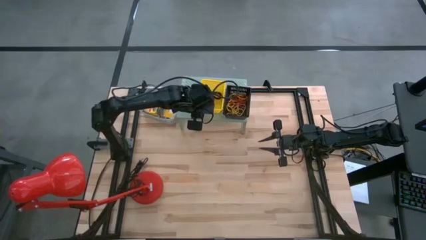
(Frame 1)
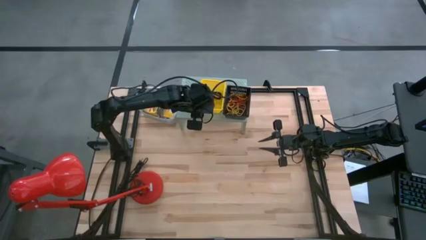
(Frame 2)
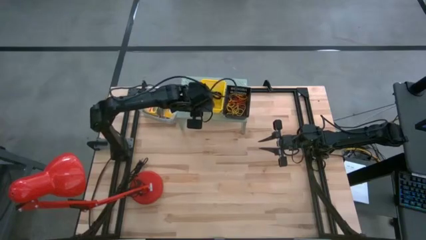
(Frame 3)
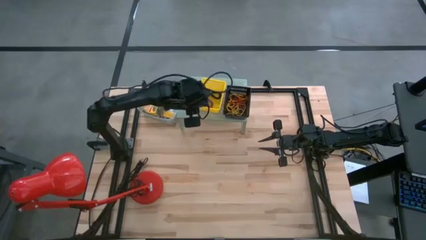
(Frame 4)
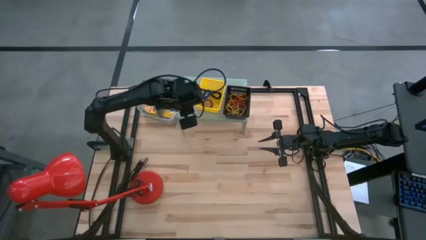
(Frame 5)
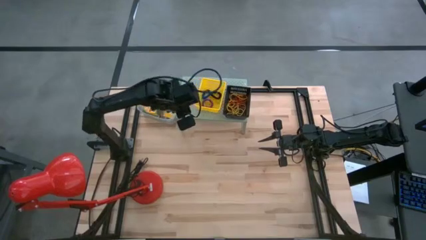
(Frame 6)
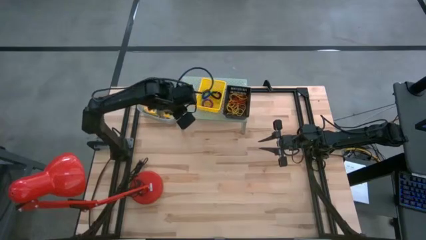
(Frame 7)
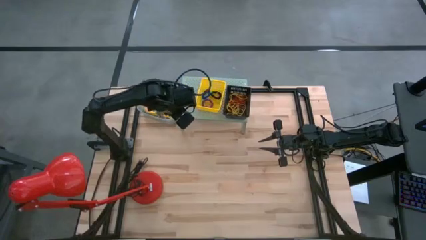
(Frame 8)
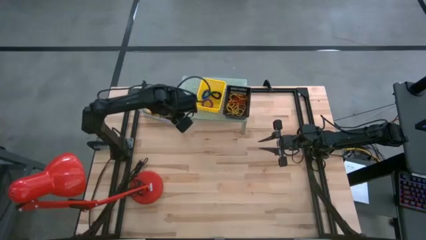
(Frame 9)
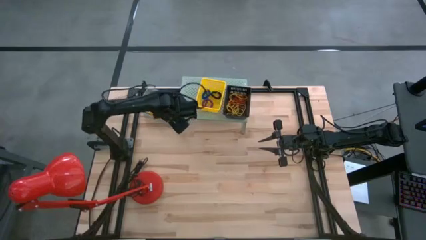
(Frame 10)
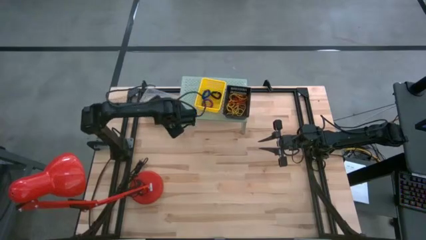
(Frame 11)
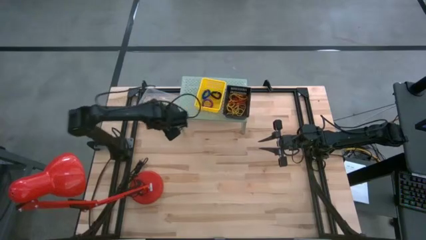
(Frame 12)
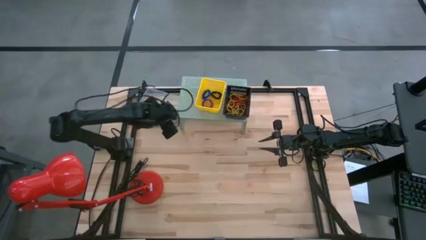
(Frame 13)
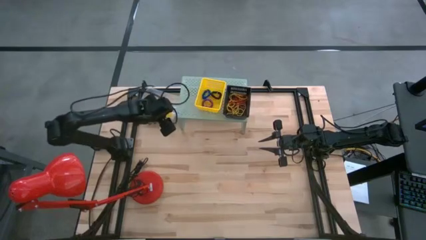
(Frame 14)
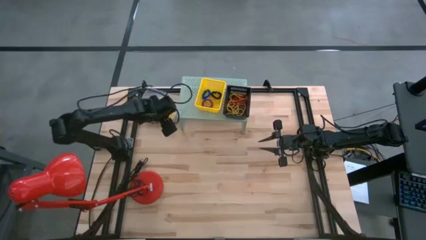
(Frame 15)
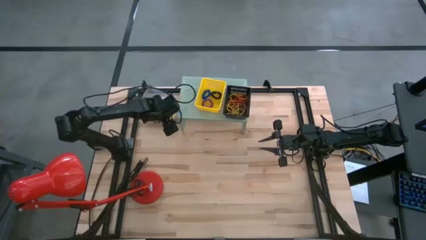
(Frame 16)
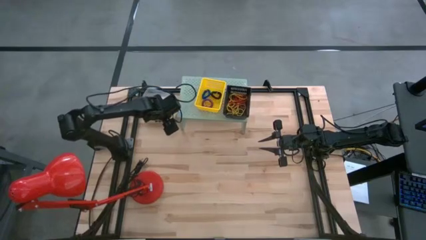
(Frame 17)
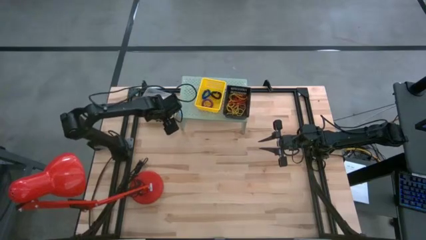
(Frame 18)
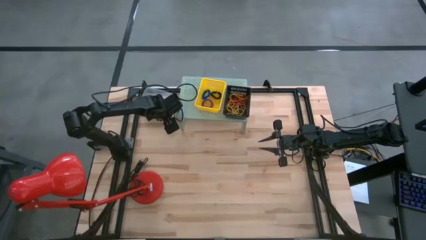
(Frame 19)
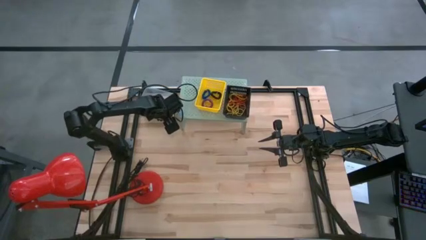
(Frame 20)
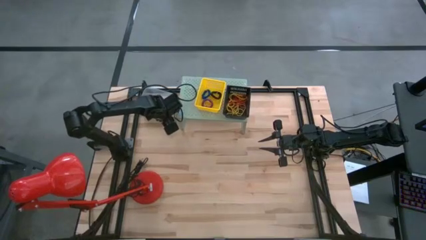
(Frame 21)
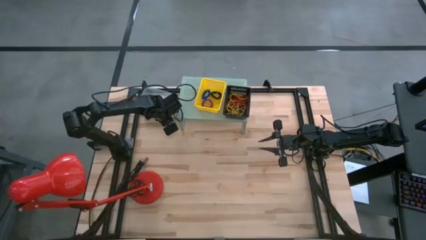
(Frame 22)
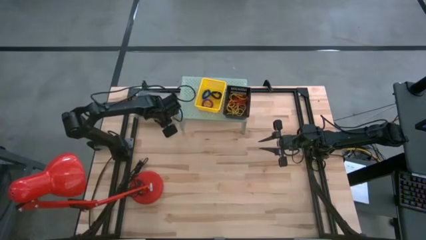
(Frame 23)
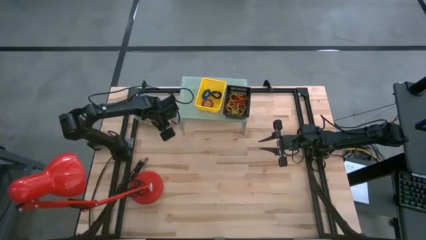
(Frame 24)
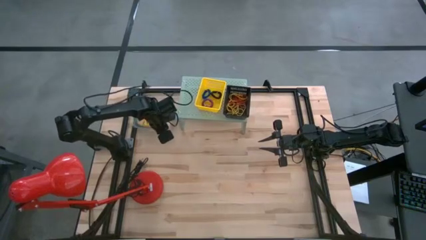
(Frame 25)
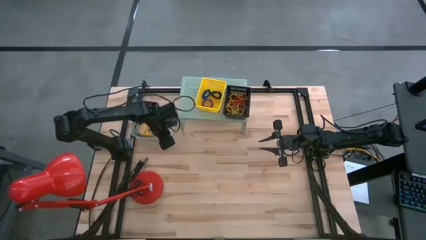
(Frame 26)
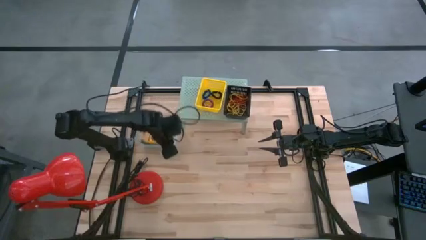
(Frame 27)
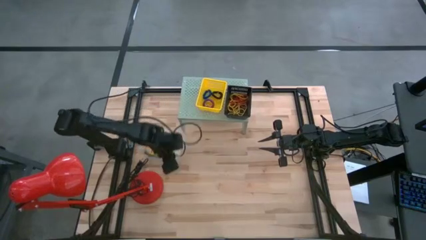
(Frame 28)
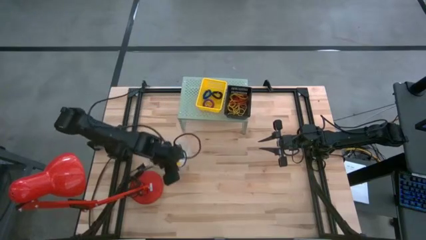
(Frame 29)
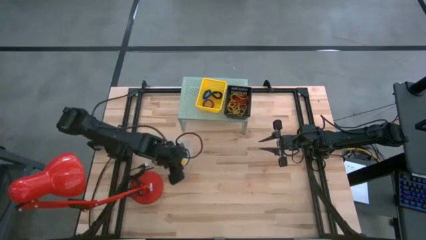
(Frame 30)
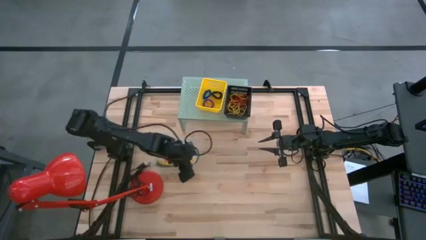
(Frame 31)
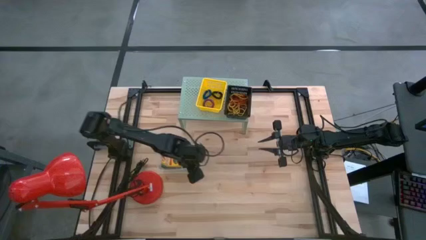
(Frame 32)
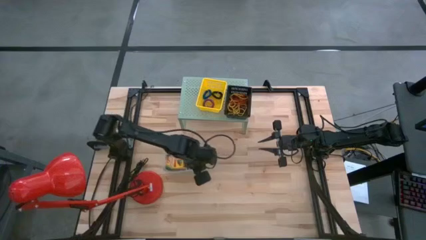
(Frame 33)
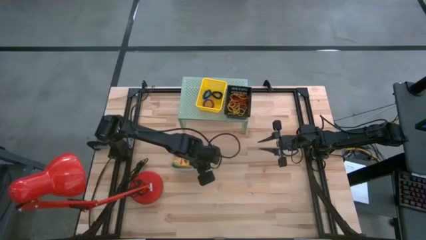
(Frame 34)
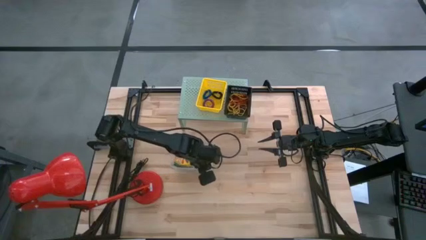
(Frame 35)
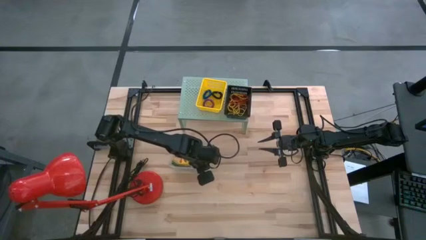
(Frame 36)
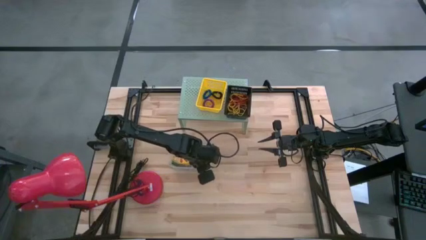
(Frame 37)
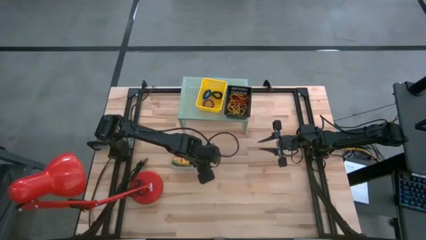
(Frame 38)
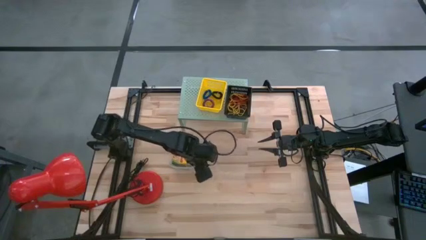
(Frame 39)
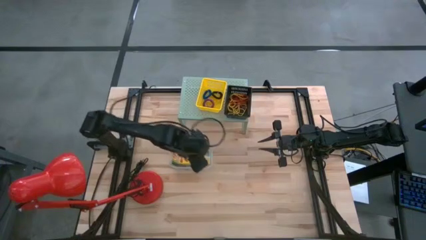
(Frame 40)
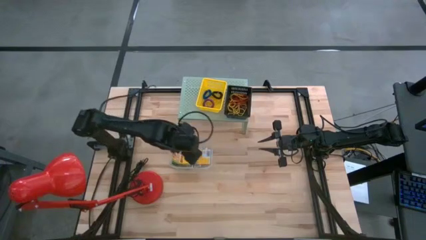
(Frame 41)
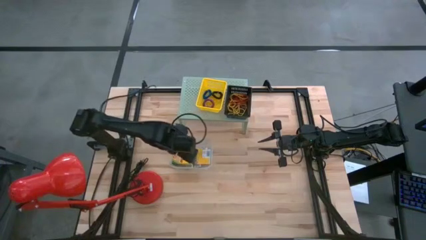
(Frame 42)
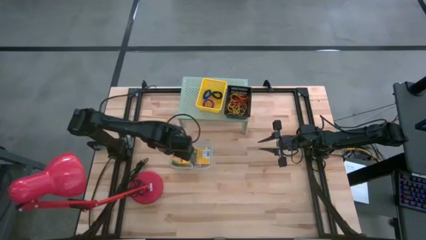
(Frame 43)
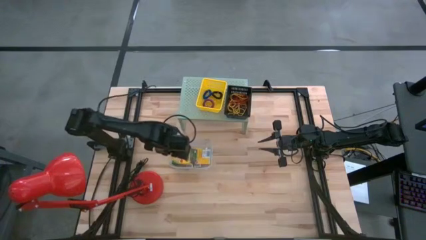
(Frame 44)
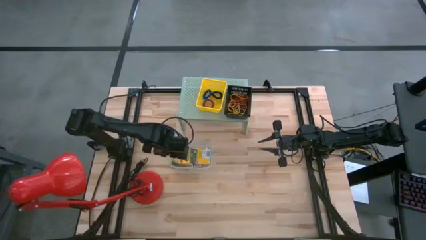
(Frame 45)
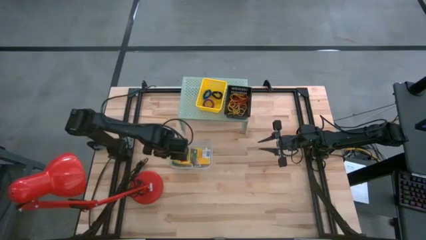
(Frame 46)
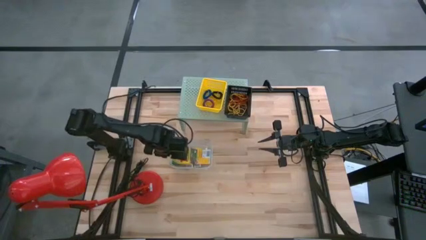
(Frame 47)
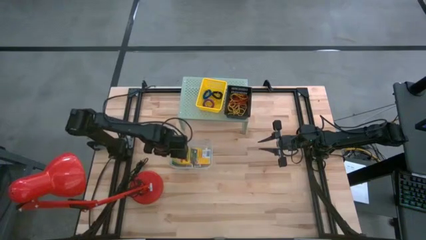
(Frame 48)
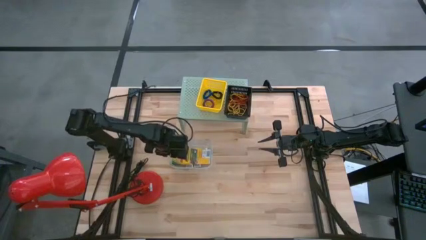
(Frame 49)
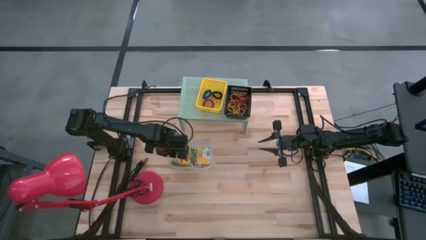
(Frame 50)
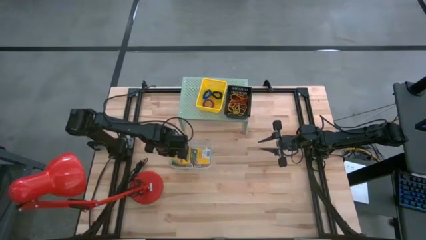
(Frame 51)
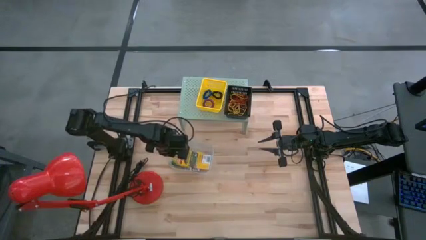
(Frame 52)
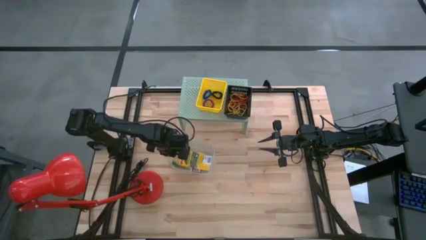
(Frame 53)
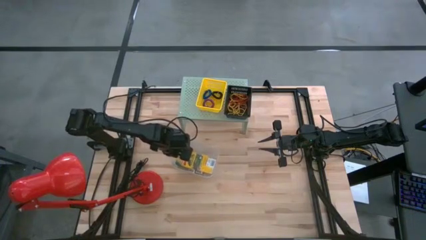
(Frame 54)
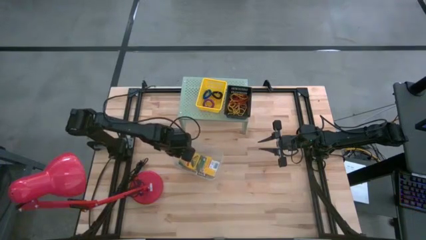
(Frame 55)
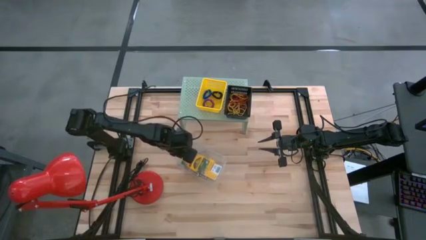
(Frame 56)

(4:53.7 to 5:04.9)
Task: Pick & Place Office Desk Supplies
Put the transparent bin on the shelf
